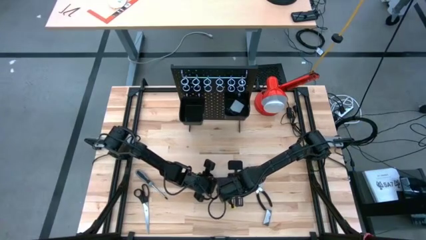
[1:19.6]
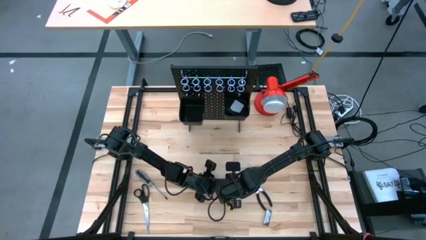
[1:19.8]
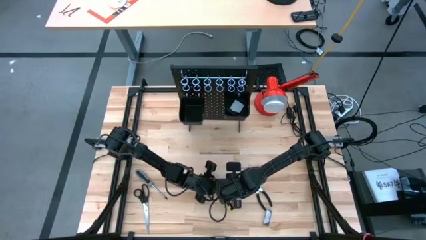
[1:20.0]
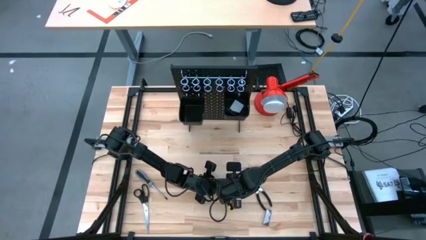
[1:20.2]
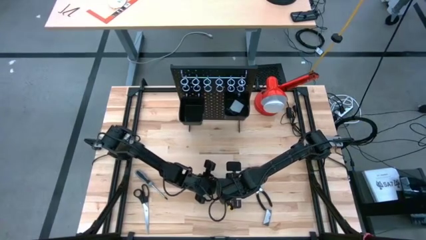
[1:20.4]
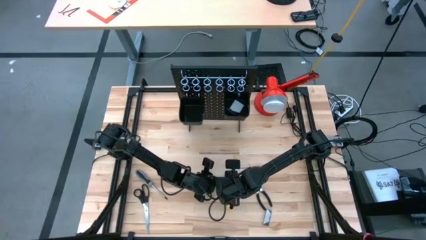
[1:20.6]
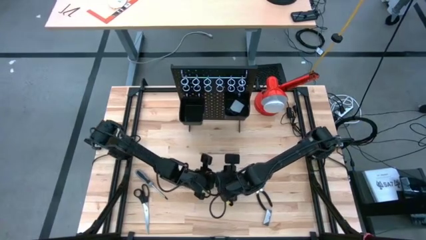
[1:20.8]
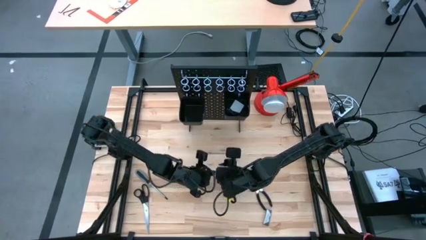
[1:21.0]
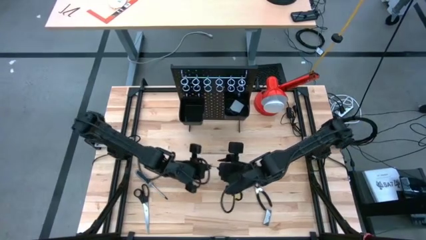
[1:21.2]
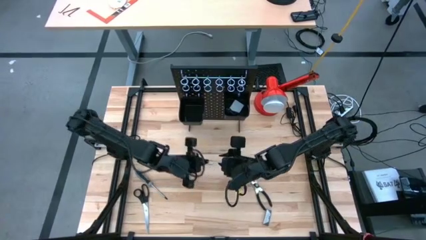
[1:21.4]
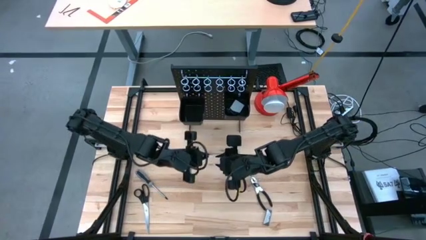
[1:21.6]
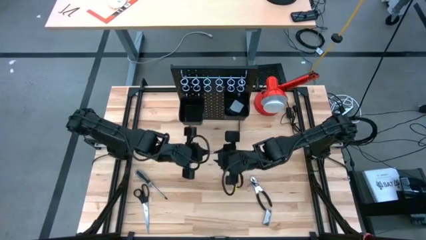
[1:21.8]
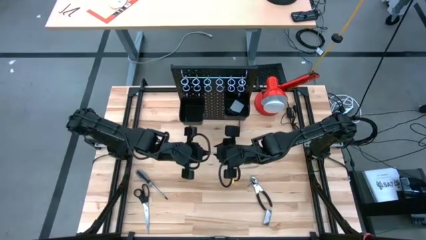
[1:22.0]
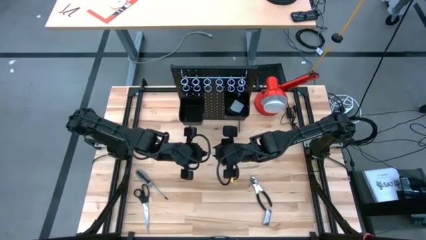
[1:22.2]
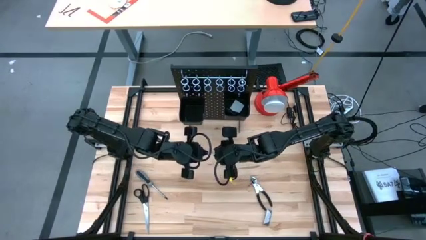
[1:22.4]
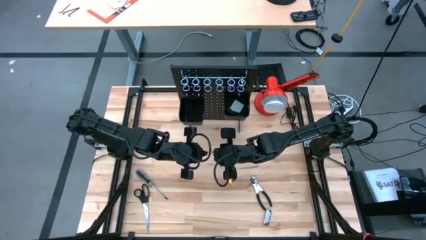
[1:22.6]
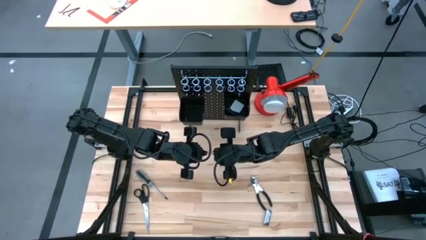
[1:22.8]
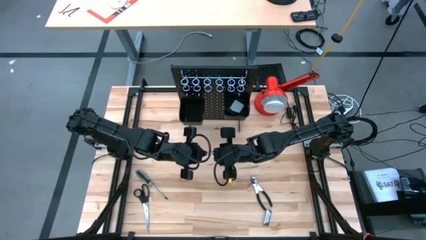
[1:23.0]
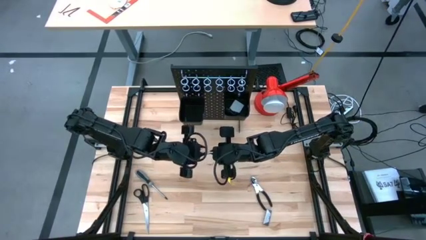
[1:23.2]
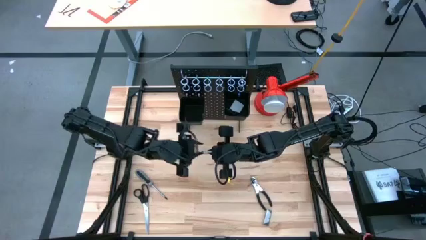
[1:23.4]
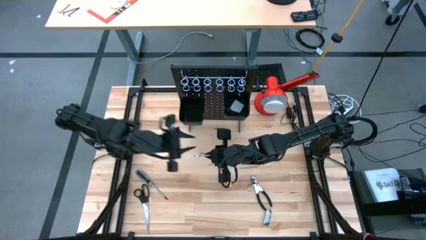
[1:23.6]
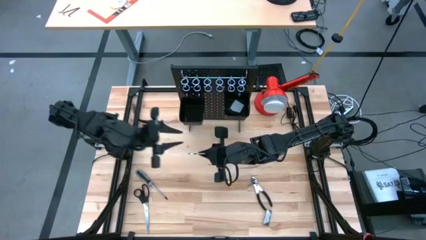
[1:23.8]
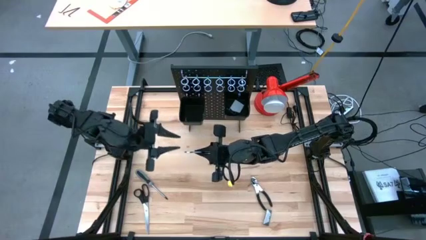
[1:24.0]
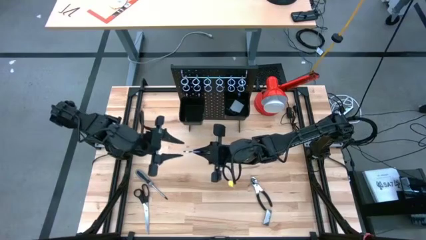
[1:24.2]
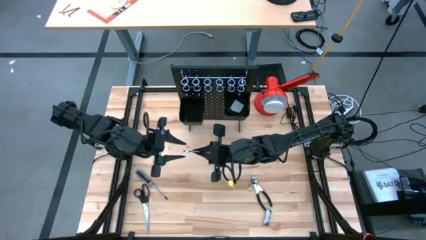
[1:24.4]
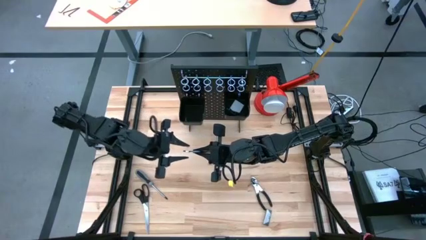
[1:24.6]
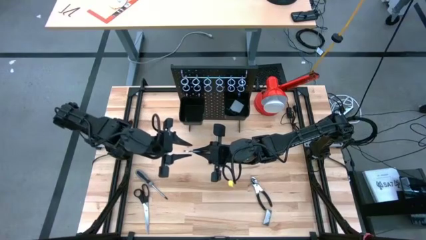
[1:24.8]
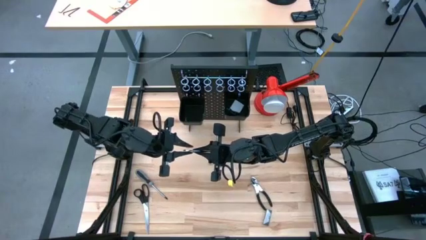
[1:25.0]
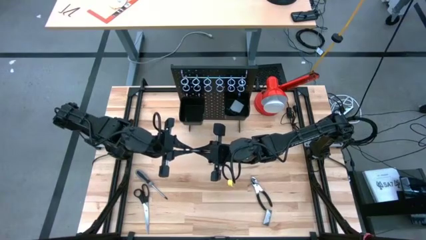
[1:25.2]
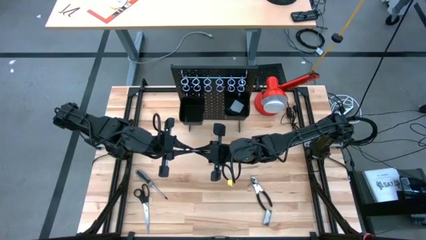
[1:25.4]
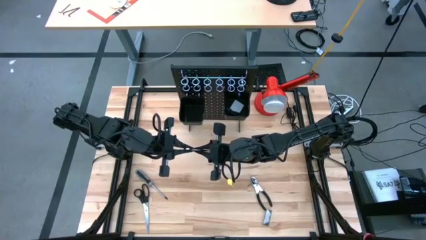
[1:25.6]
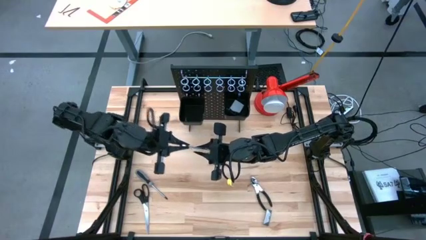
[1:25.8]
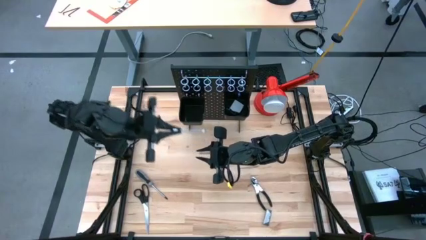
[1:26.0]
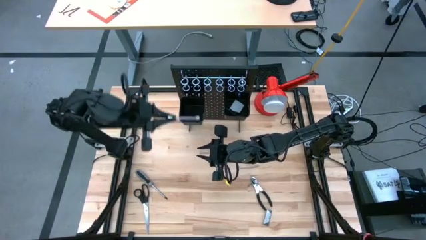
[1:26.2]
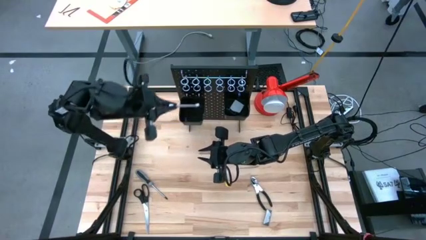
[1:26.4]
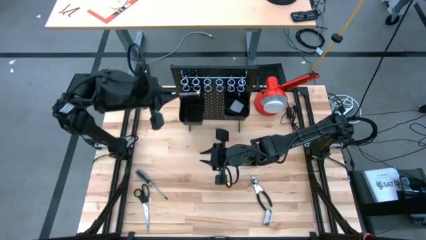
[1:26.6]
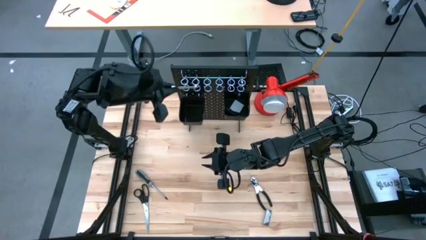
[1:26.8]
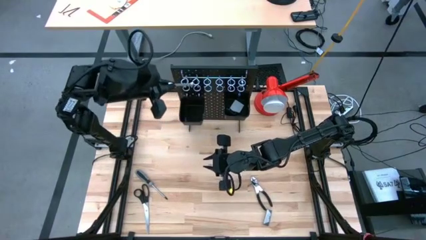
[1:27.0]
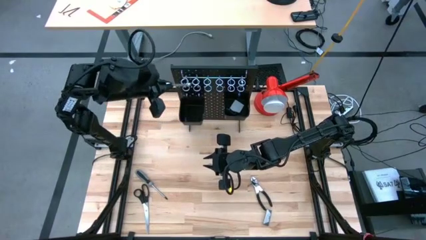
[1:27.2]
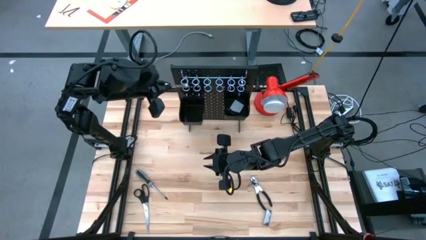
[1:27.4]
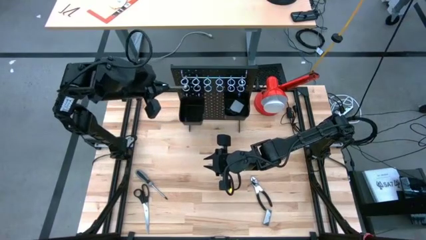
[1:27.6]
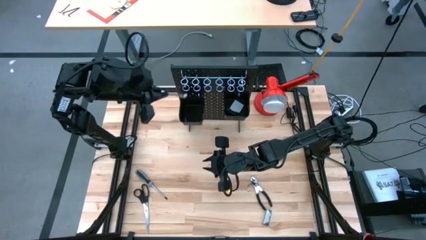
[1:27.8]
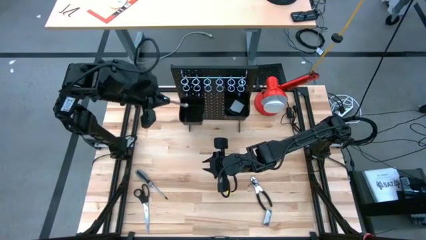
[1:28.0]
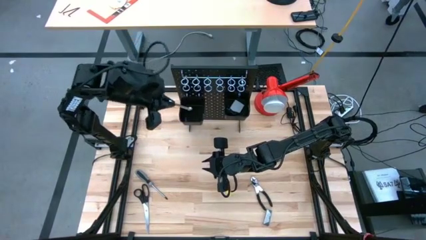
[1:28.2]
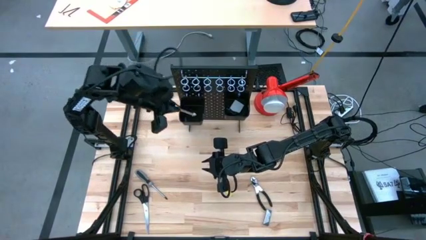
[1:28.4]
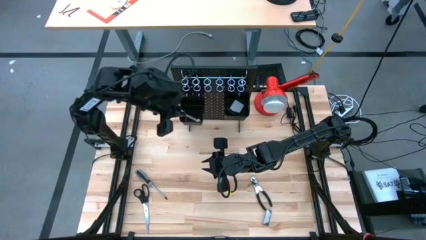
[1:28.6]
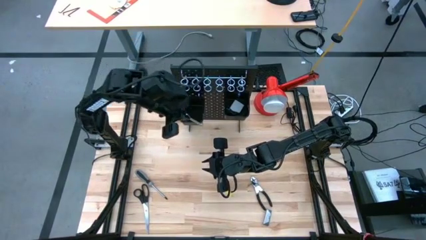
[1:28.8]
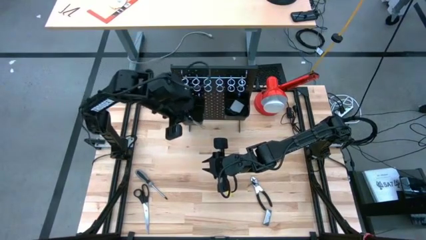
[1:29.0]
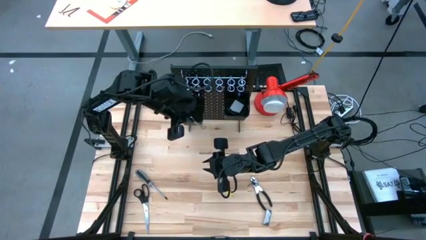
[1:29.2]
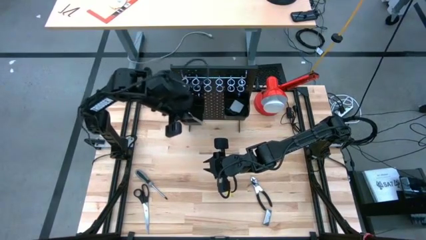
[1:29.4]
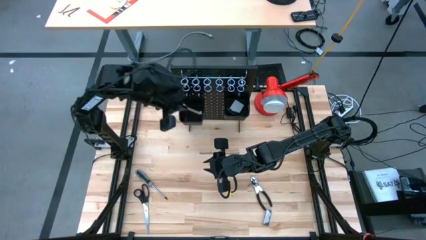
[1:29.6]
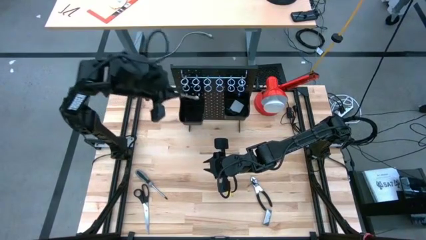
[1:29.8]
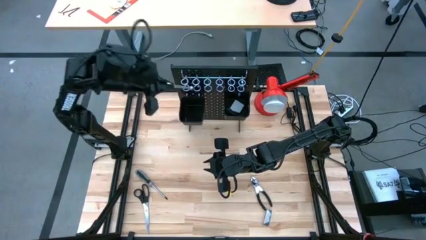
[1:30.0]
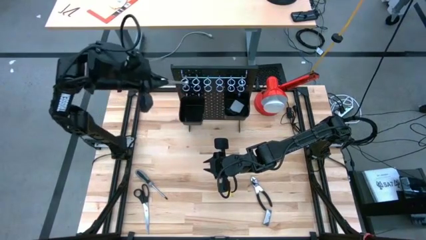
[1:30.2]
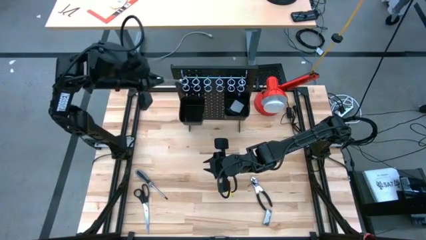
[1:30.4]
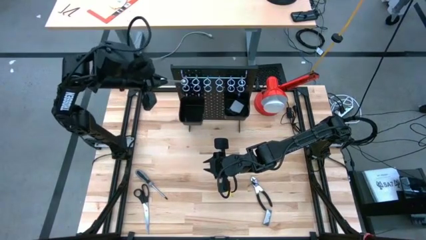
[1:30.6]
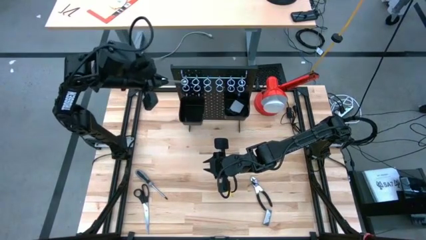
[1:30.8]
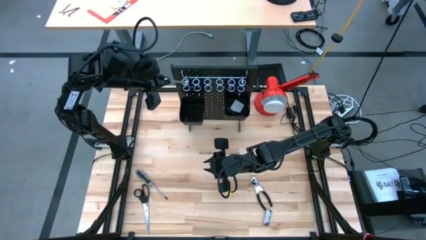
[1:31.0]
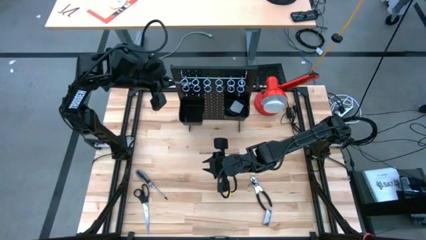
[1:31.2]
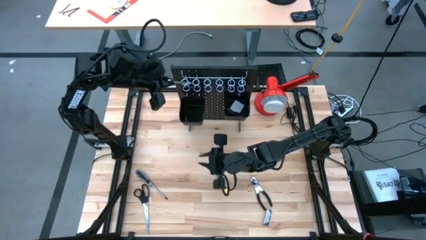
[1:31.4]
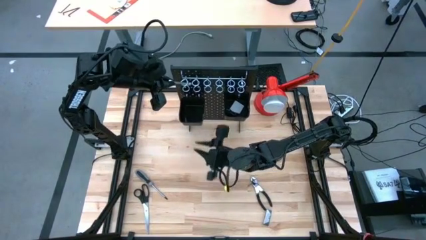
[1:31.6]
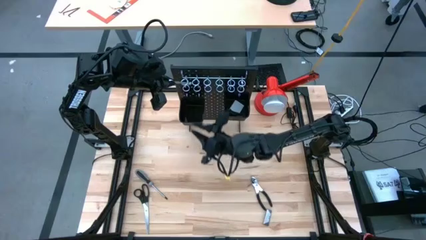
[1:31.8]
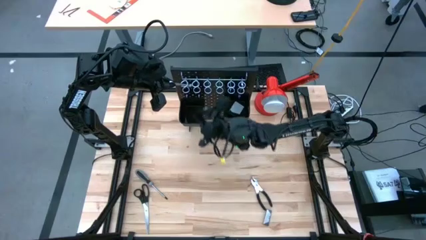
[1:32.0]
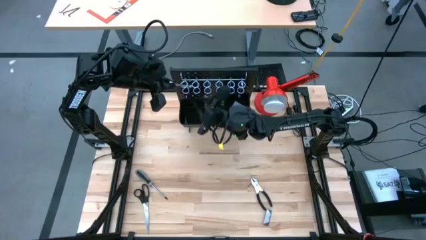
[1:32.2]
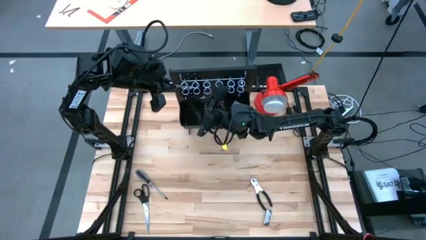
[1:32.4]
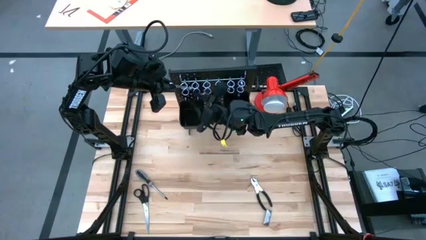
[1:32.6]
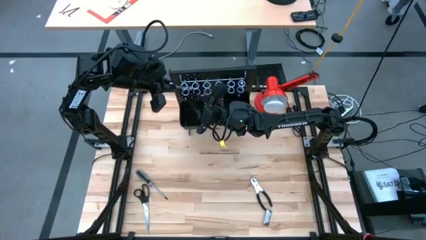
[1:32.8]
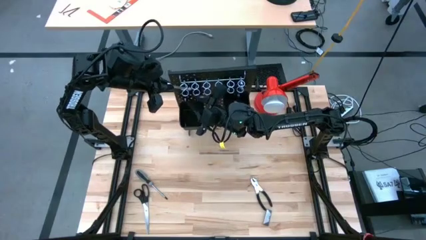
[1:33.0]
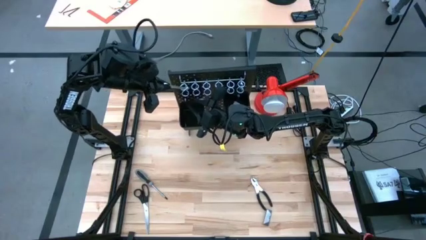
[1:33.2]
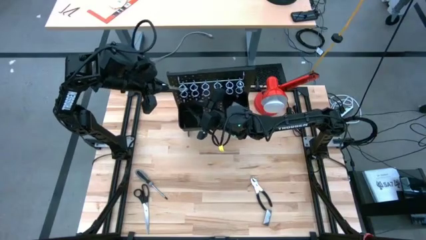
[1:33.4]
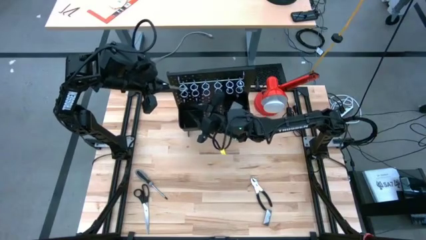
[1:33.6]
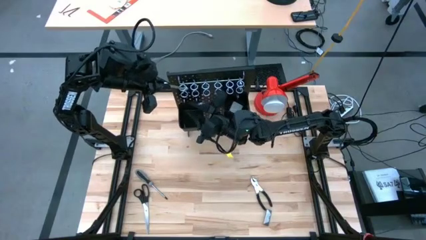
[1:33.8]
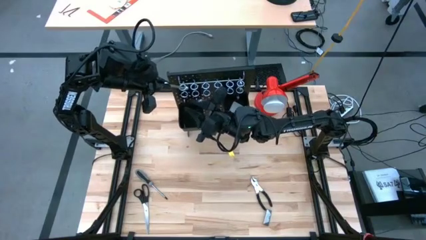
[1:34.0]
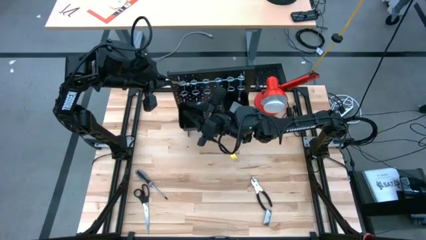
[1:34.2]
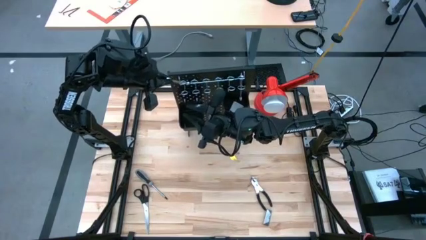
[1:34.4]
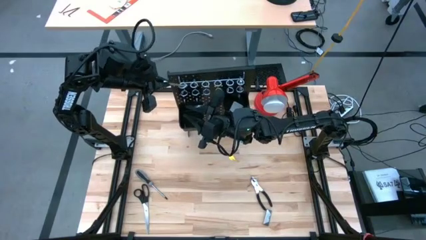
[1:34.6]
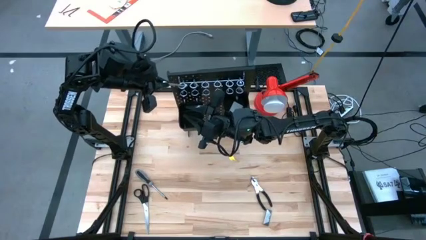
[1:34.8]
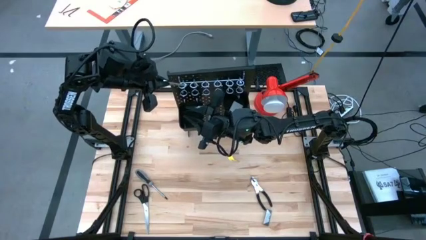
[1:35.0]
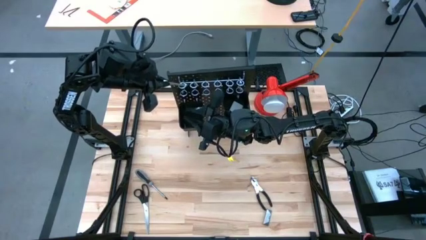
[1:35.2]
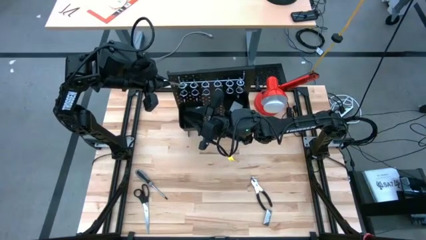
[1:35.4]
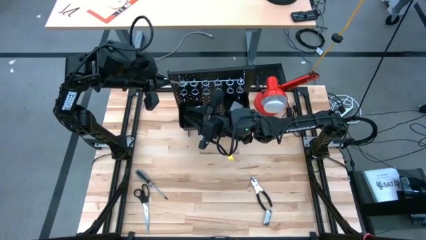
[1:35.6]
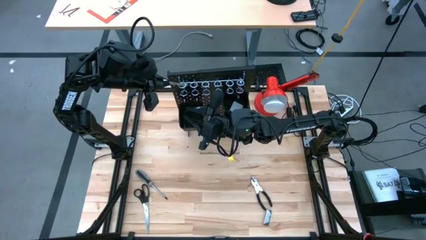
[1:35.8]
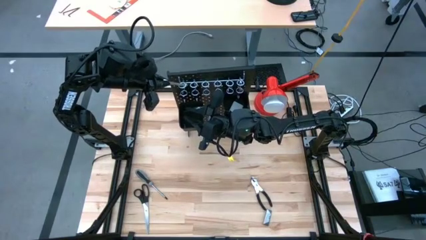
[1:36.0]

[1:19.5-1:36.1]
Task: Hang tools onto peg board
Hang the wrench on the pegboard
